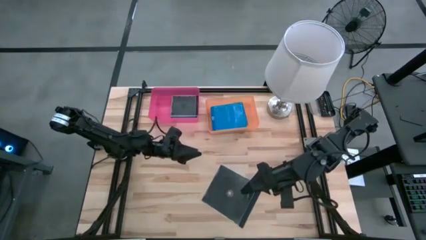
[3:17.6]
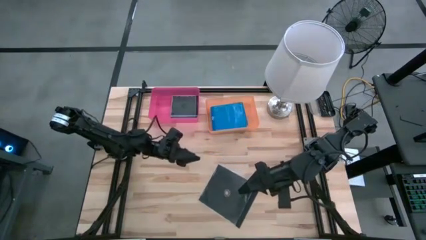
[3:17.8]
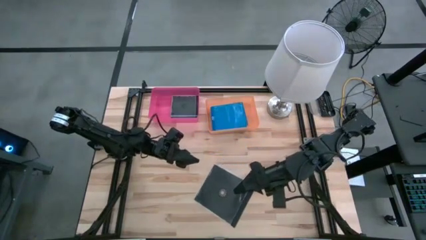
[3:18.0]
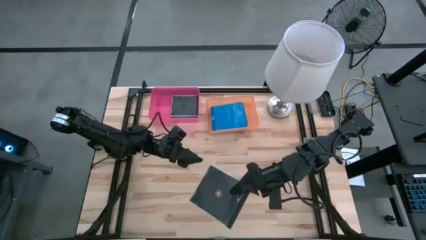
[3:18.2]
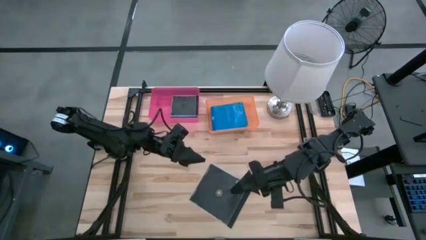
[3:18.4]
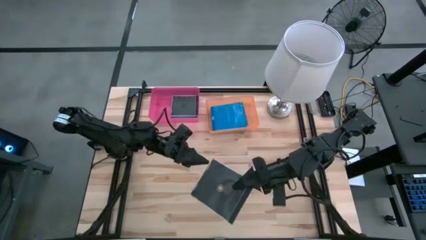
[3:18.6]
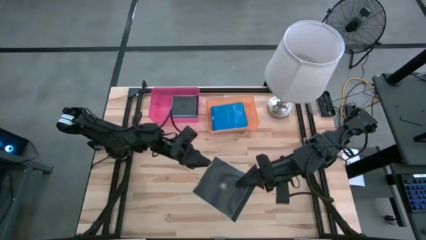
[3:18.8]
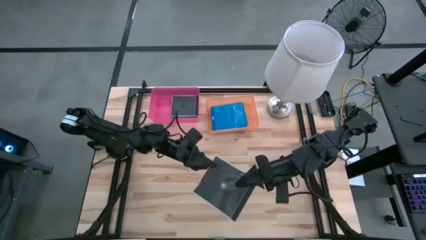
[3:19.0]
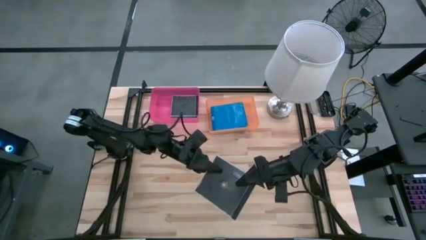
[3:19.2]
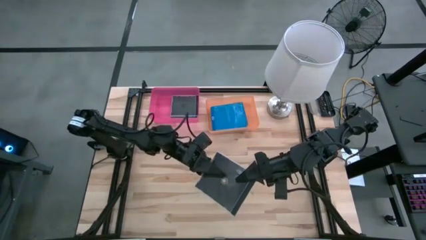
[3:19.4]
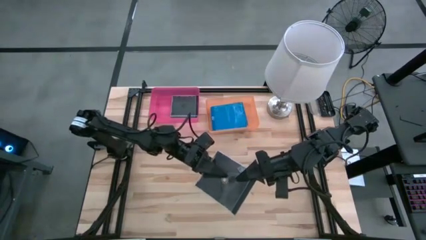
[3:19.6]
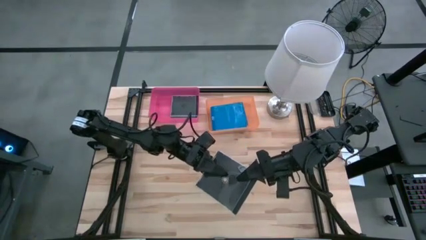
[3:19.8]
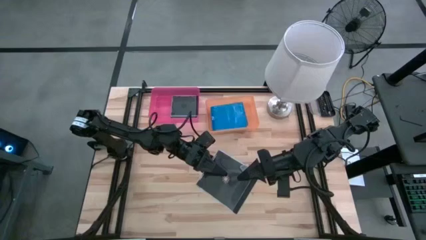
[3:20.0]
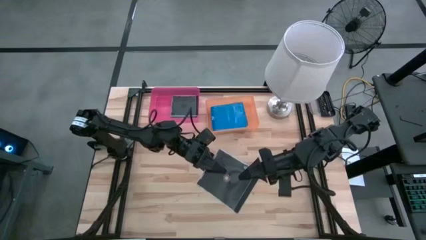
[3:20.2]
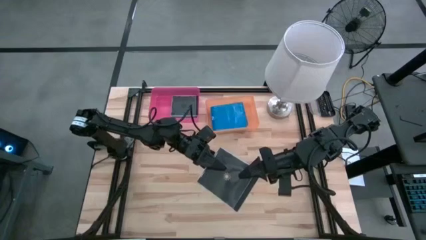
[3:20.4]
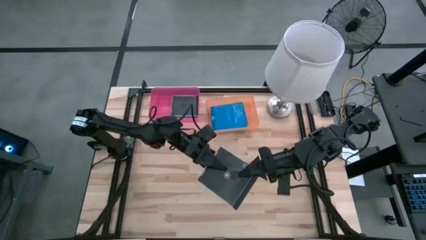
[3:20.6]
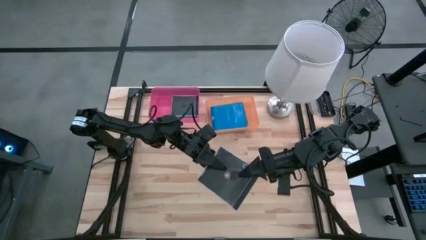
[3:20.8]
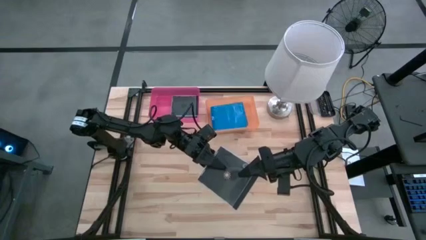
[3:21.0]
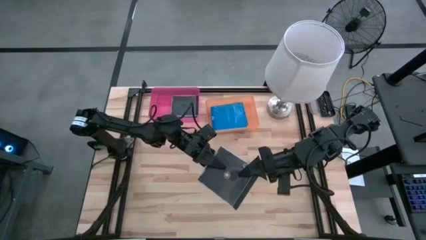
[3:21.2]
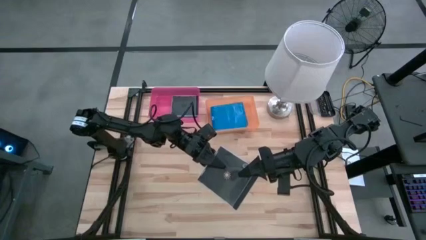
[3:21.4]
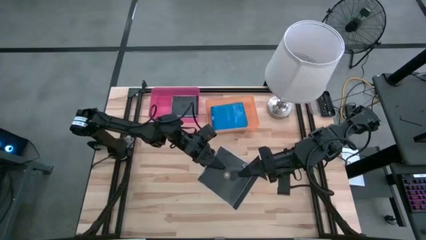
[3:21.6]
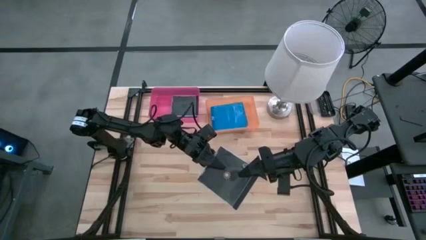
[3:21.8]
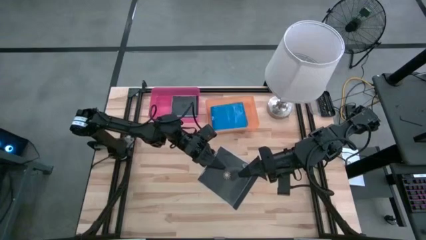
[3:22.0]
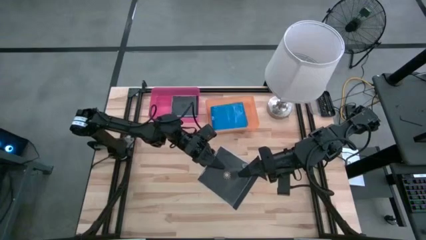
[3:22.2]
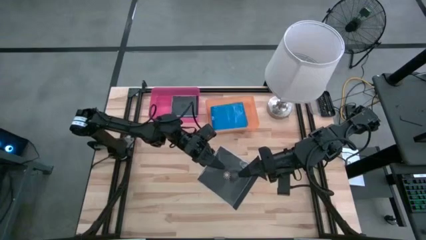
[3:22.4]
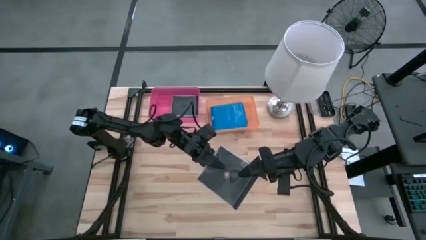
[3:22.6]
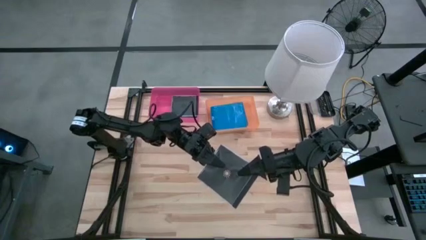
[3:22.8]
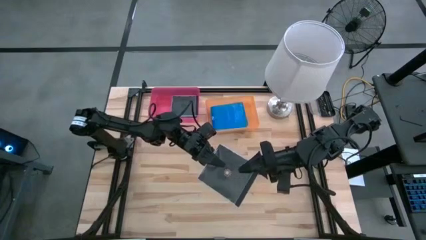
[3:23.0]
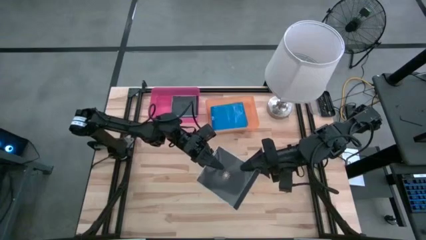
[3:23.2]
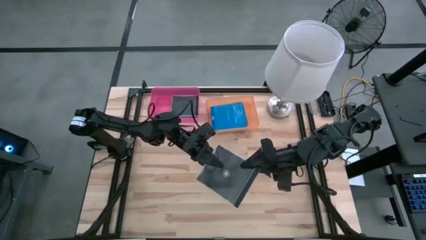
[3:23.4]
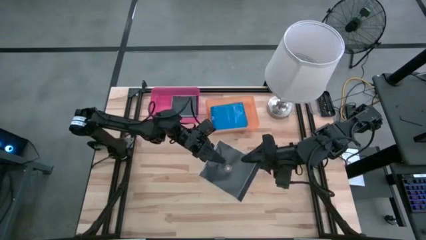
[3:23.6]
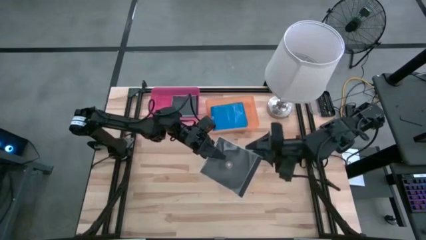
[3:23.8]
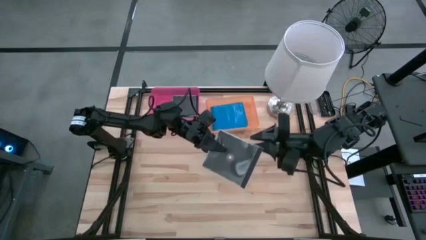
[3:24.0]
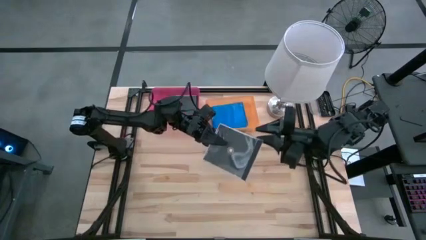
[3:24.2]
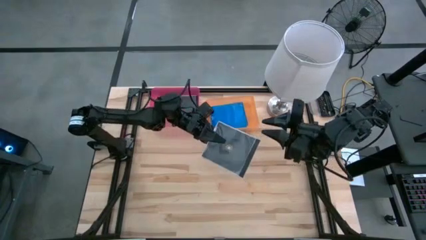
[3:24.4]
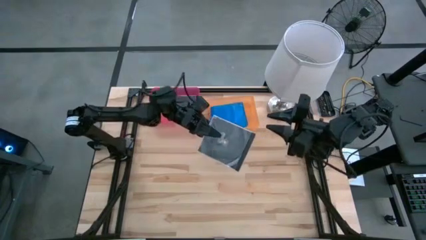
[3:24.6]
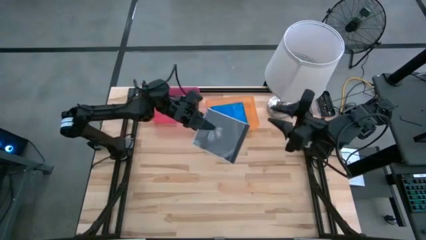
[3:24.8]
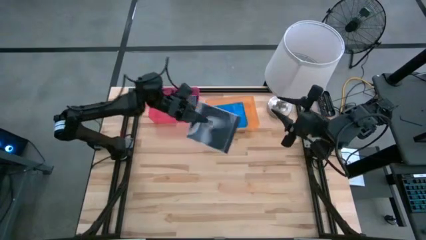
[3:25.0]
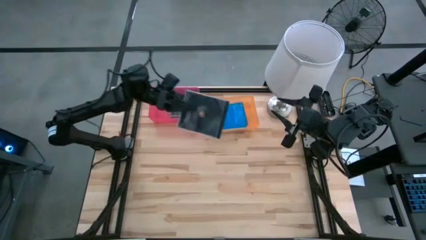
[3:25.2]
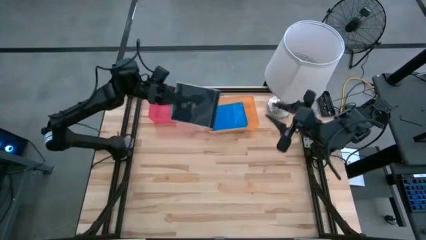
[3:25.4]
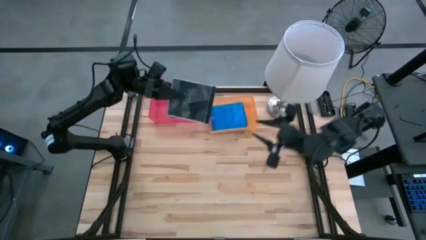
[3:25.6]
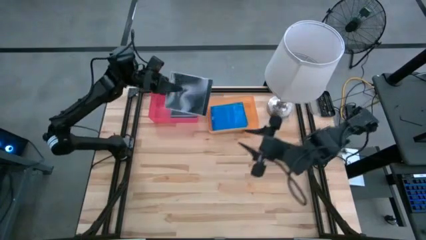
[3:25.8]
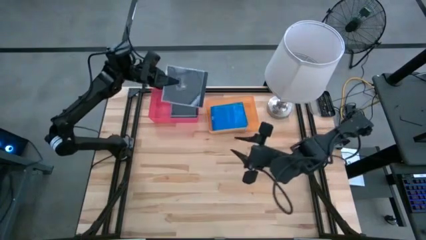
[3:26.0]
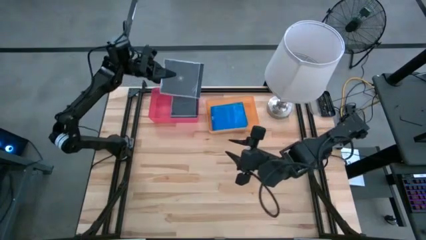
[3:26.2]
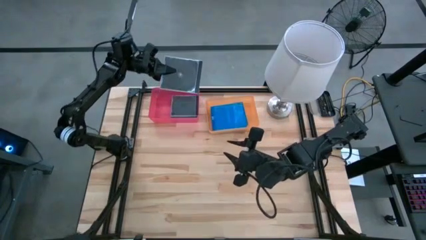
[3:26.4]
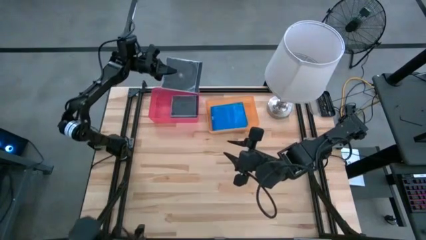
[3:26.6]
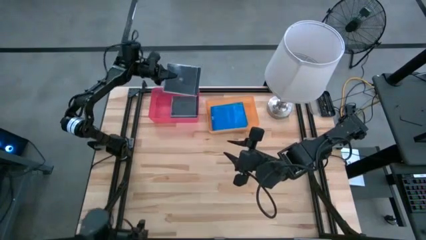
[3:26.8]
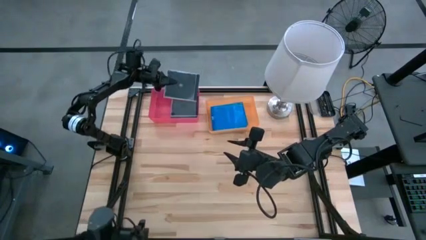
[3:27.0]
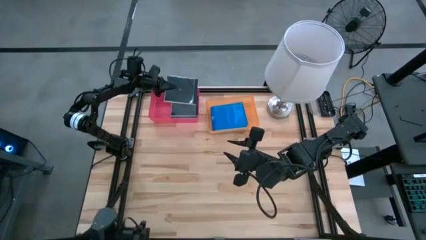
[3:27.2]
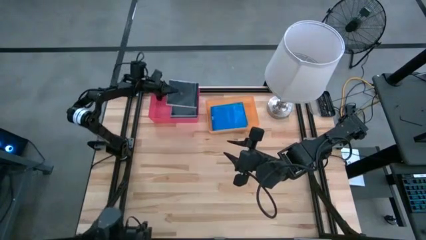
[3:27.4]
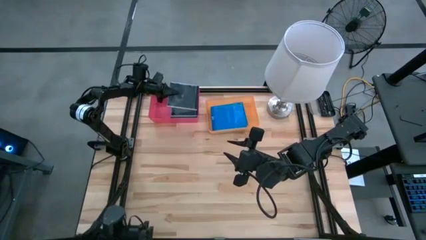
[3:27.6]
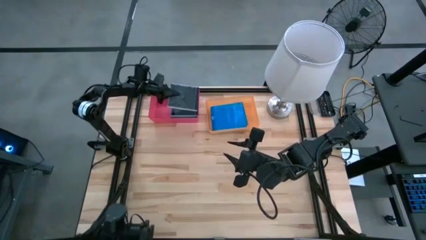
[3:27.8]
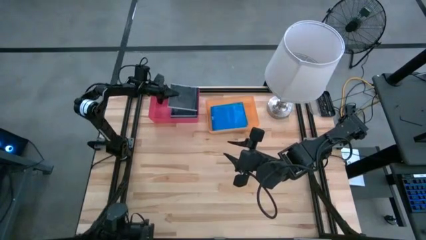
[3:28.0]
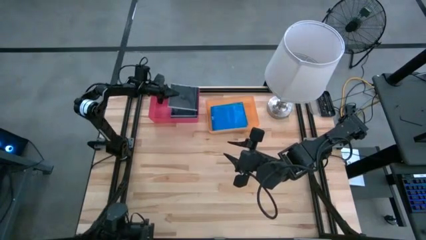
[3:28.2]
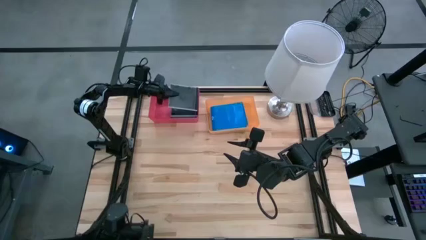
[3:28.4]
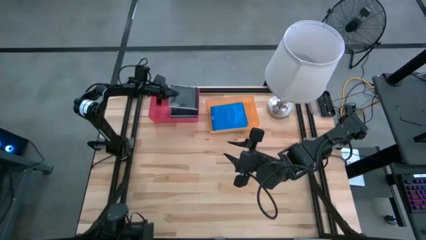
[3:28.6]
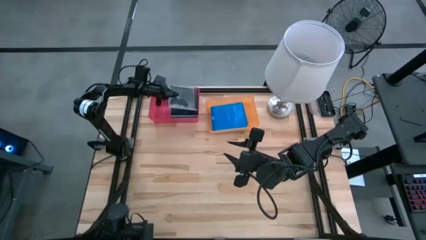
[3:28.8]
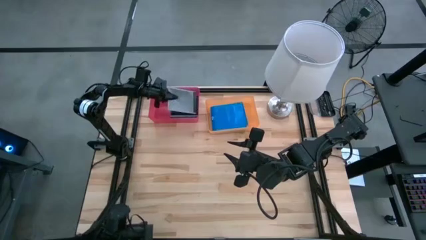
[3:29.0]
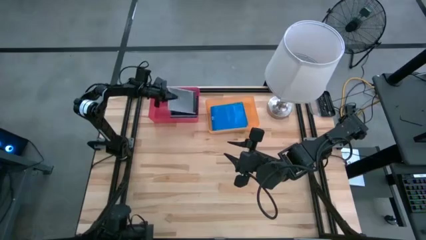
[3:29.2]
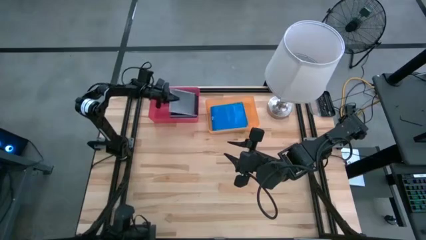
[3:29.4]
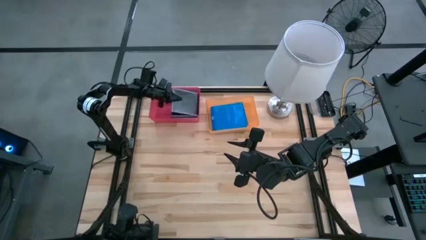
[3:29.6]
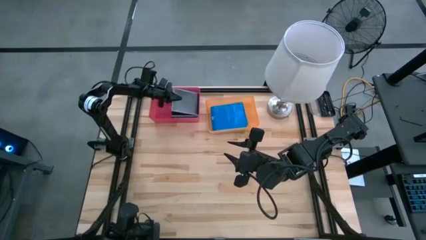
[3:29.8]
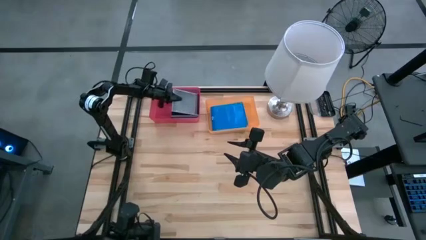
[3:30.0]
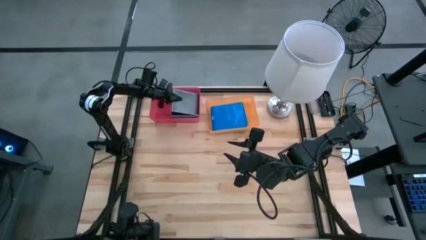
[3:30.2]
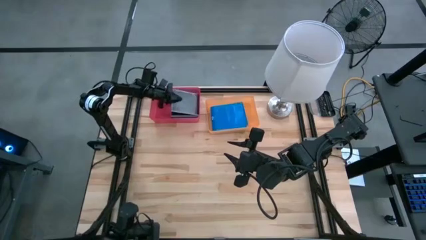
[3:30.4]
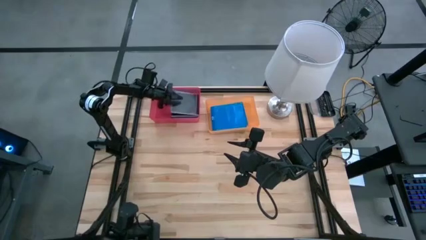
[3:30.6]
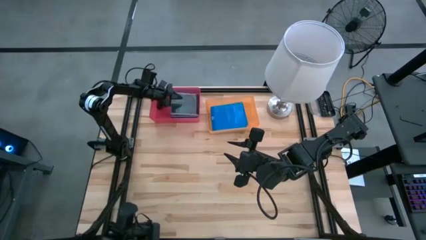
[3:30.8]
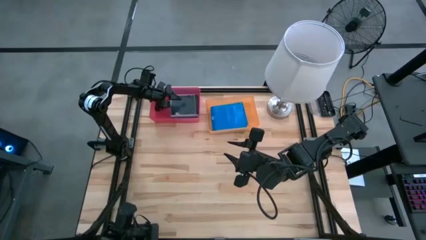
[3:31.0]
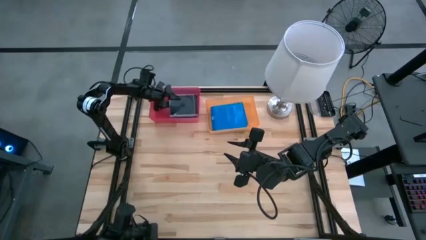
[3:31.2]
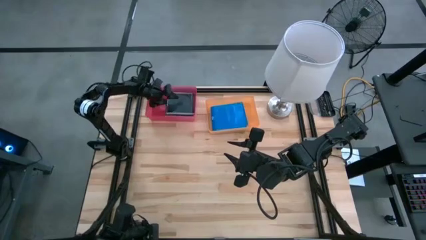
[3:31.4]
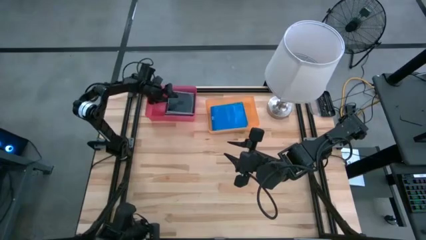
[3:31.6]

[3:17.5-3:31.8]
Task: Pick & place jewel cases by type
Put the black CD case into the pink bin
